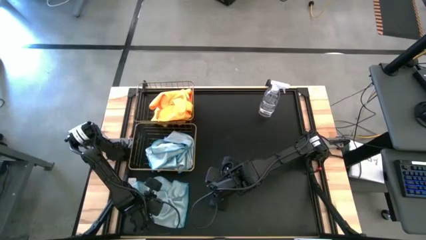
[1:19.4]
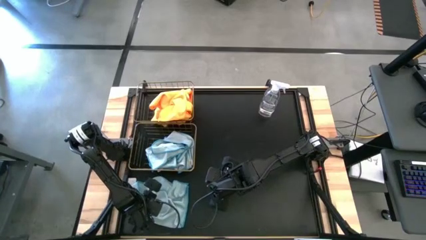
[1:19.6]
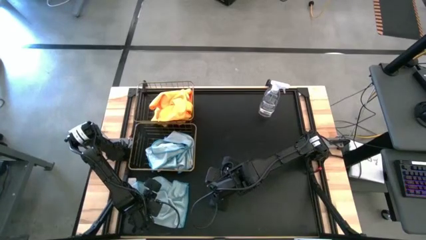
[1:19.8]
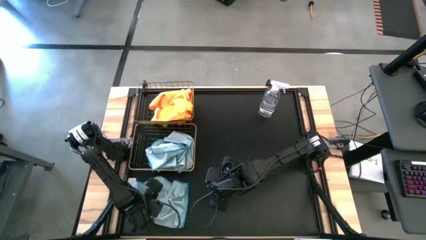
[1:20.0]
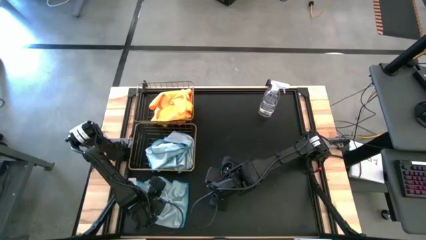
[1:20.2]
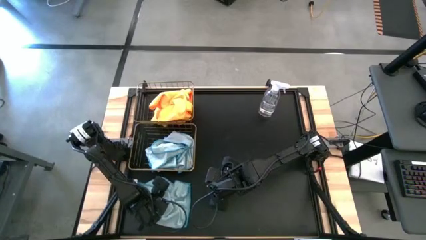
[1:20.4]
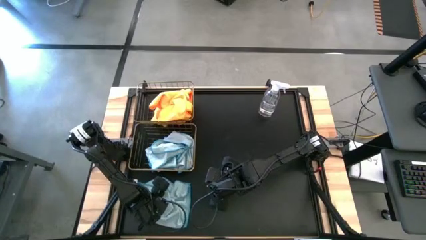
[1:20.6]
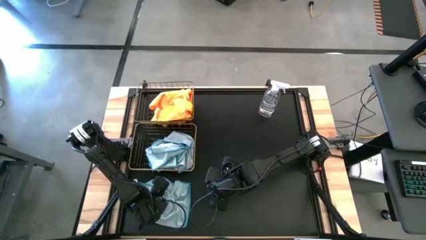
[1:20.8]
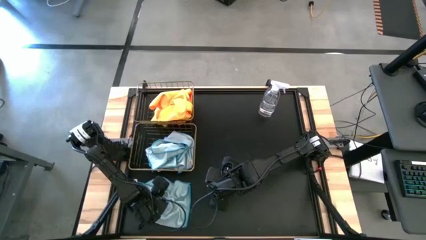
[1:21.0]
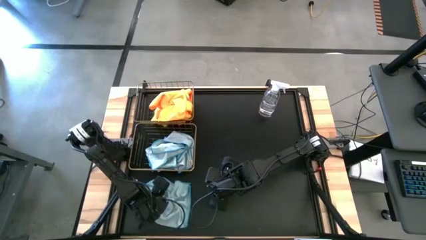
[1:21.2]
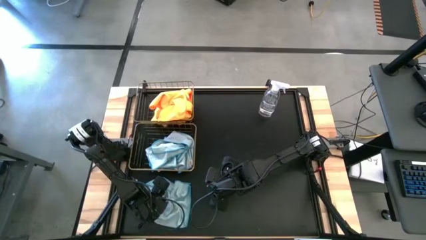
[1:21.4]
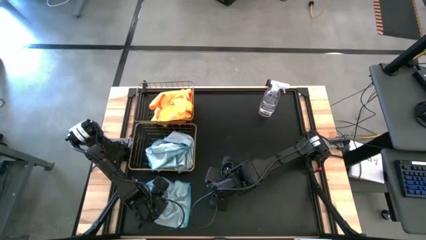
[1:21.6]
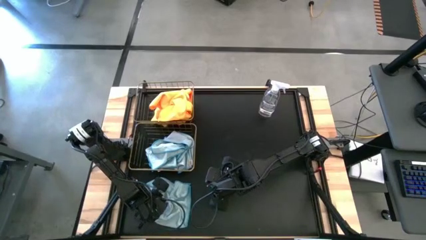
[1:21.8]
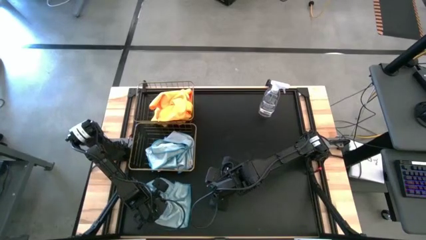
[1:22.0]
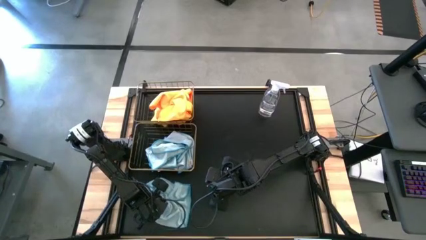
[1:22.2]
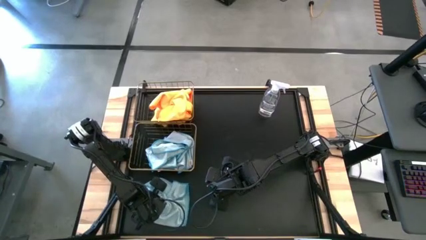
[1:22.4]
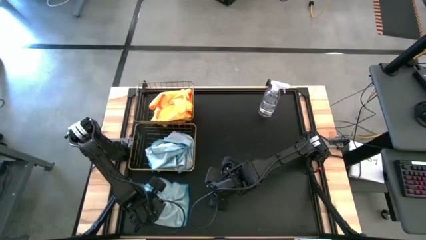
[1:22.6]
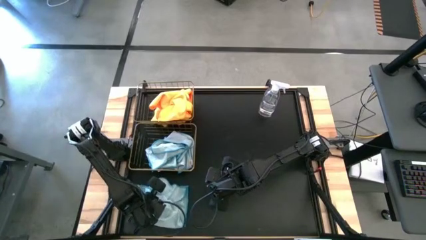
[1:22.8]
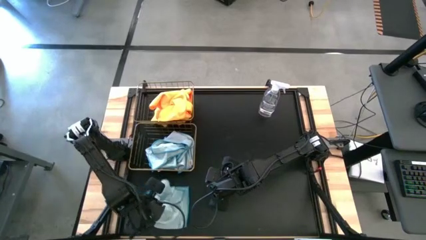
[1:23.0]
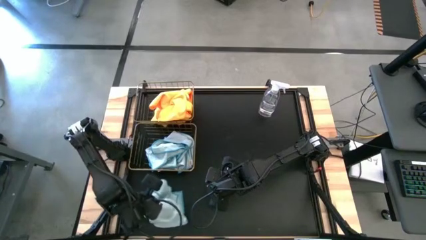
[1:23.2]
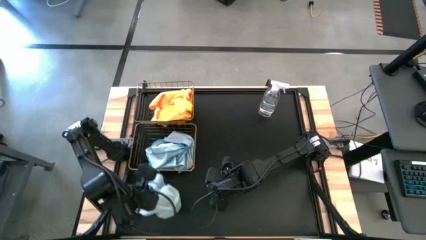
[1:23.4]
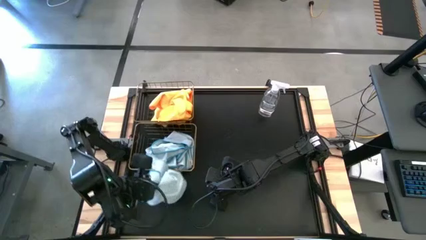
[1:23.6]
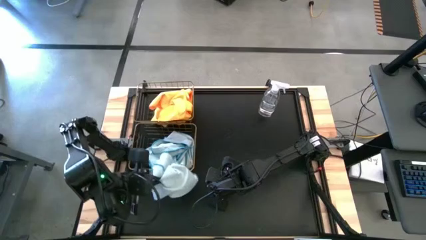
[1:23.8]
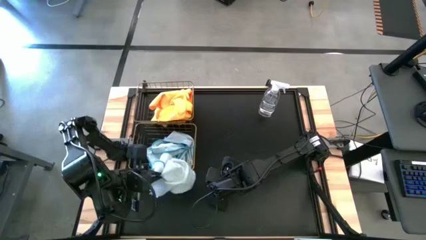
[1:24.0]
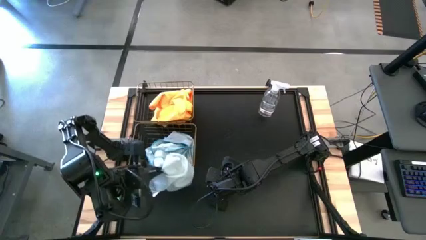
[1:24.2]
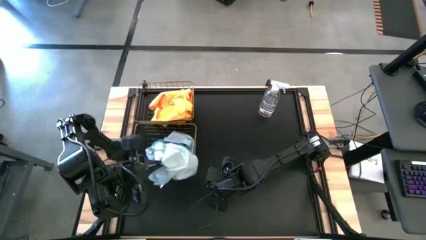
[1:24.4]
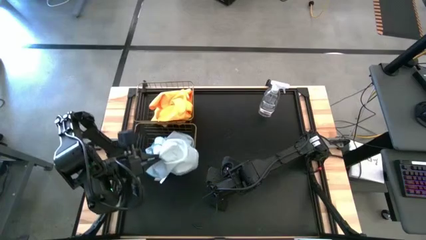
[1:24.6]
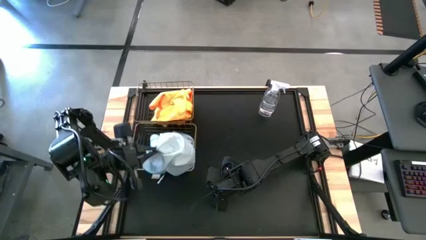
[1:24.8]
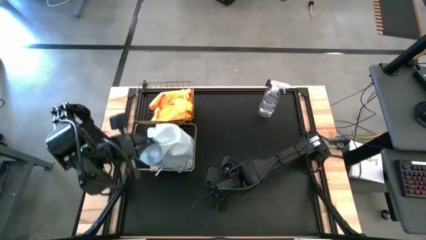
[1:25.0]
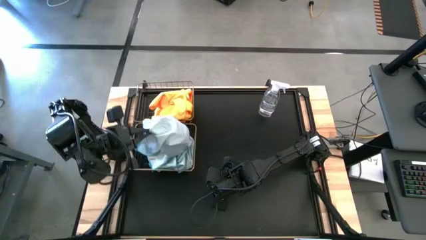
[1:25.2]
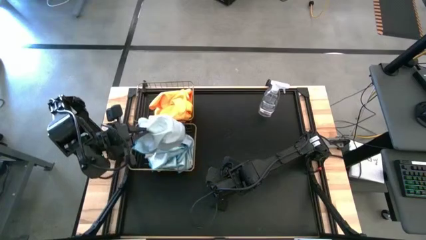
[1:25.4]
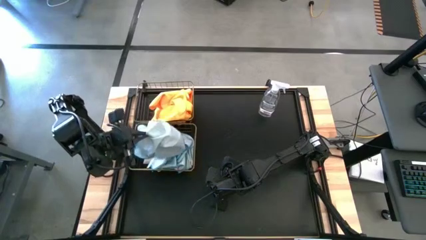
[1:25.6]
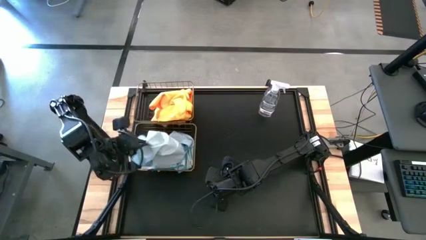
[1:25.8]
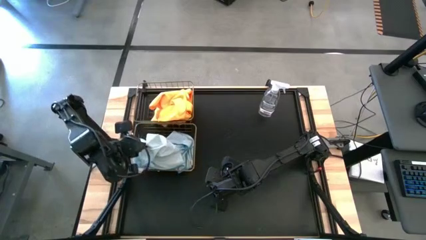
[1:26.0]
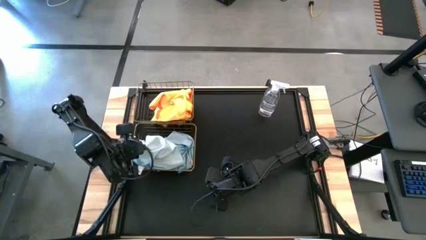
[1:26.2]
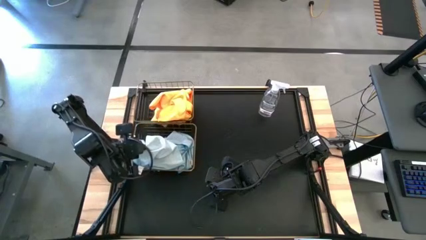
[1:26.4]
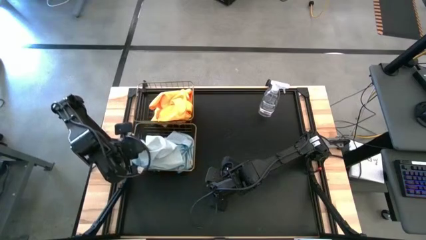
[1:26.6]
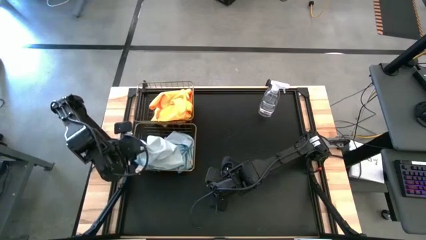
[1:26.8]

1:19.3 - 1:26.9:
Task: Sort microfiber towel by color & place in baskets
Put the blue towel into the bottom wire basket
